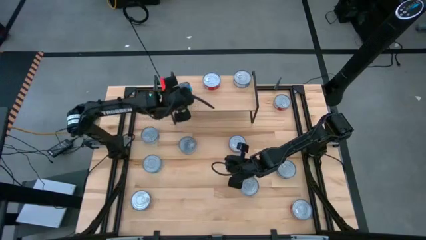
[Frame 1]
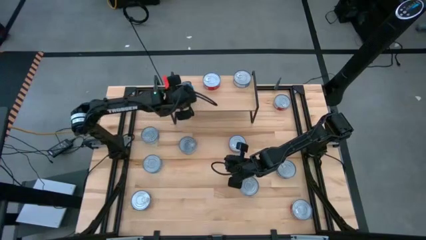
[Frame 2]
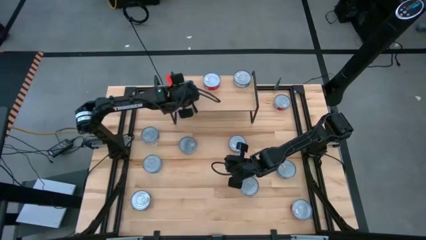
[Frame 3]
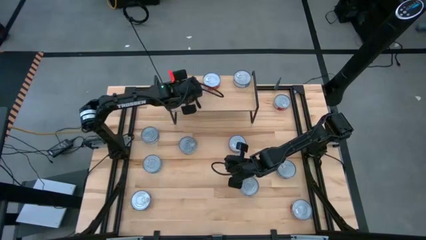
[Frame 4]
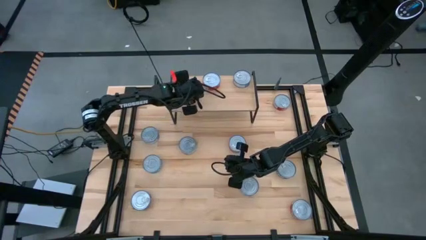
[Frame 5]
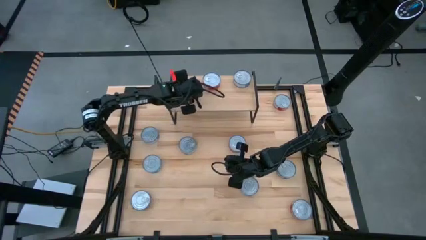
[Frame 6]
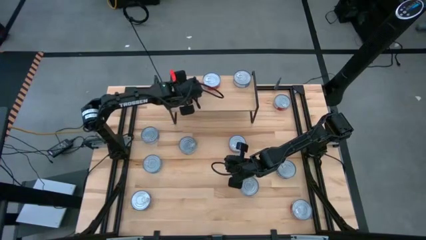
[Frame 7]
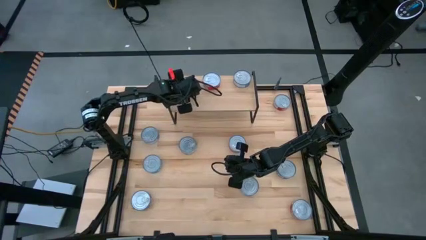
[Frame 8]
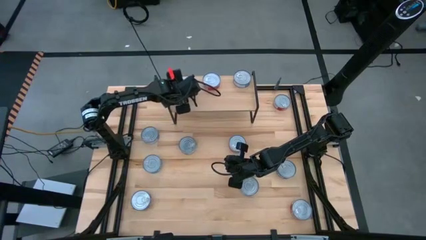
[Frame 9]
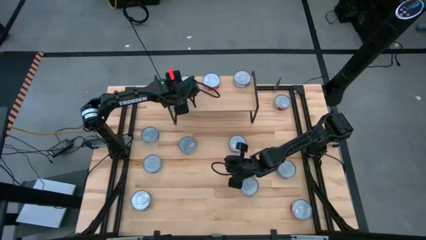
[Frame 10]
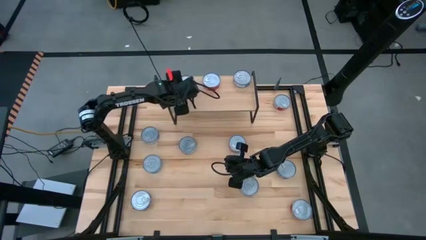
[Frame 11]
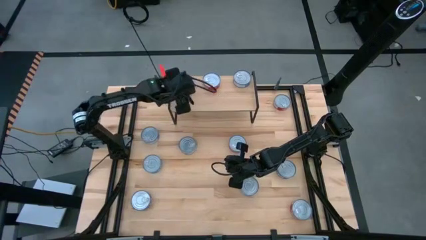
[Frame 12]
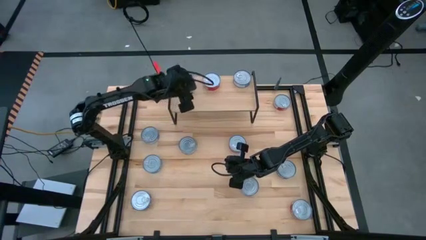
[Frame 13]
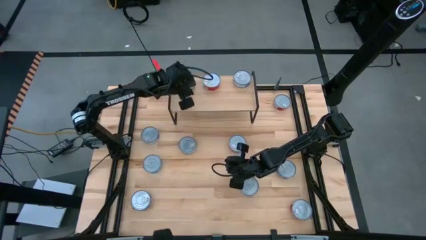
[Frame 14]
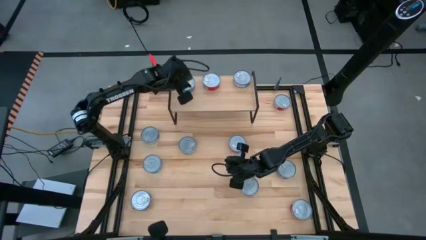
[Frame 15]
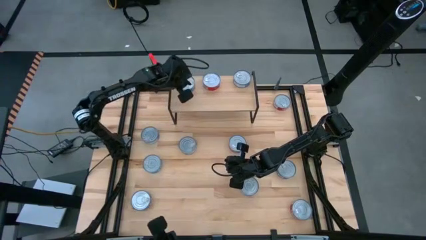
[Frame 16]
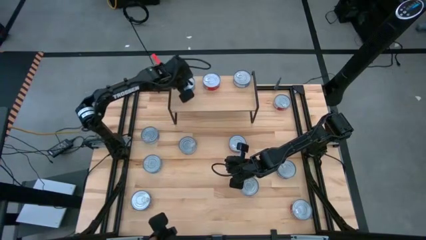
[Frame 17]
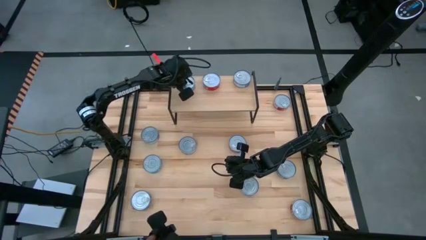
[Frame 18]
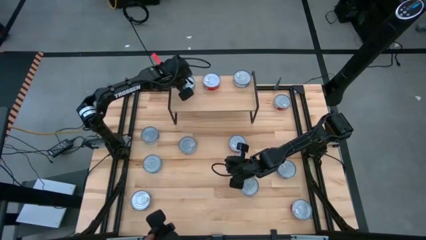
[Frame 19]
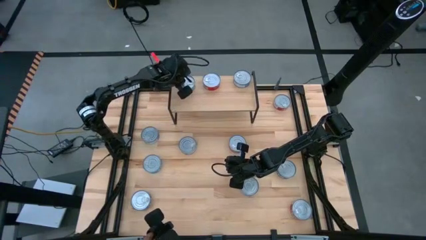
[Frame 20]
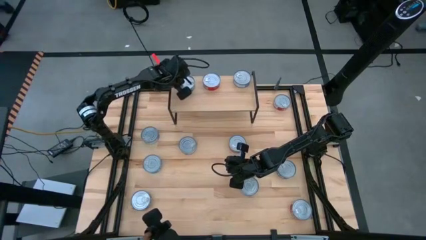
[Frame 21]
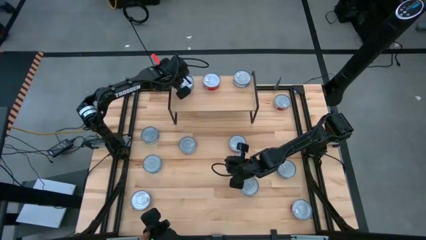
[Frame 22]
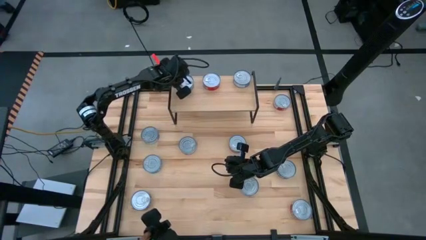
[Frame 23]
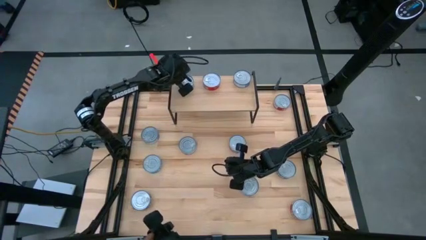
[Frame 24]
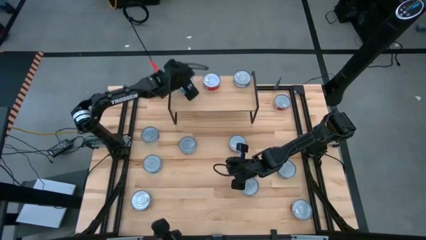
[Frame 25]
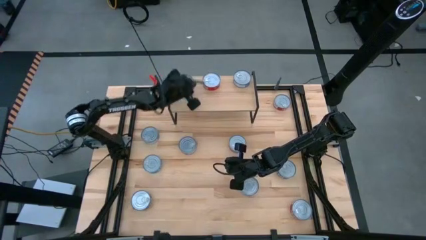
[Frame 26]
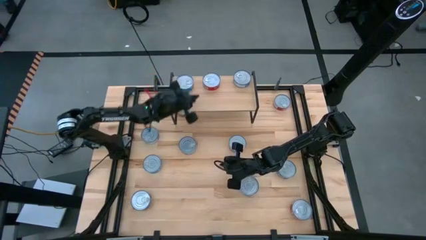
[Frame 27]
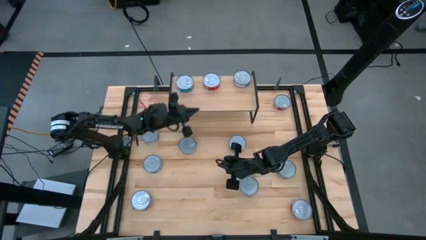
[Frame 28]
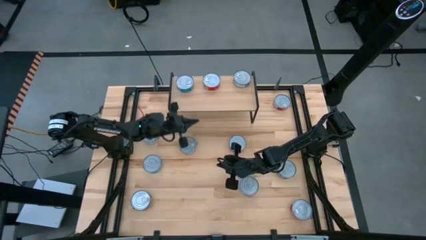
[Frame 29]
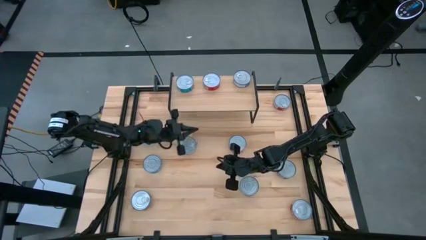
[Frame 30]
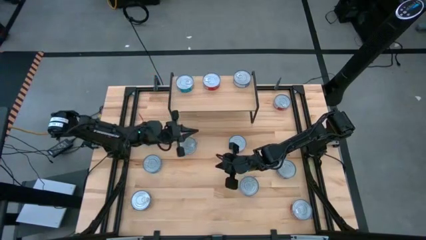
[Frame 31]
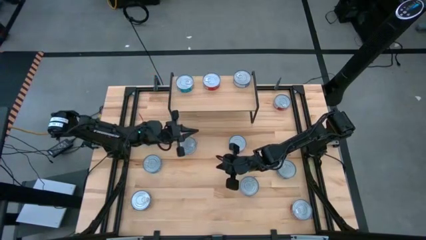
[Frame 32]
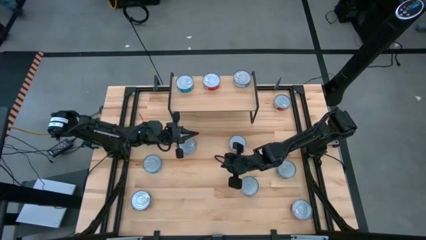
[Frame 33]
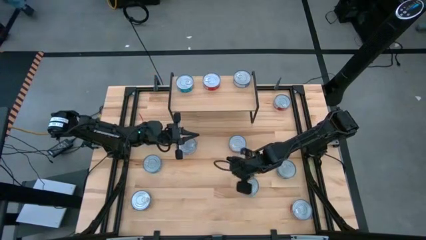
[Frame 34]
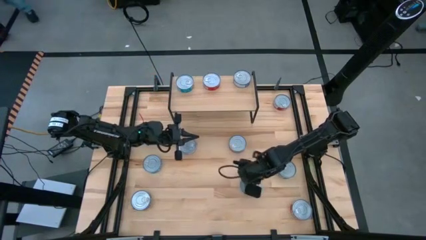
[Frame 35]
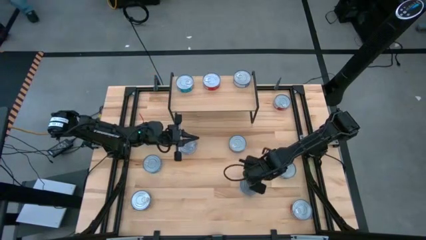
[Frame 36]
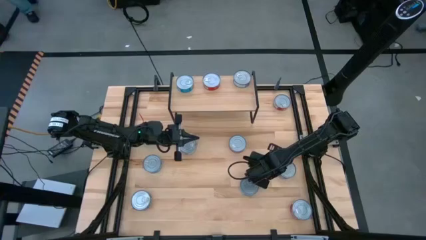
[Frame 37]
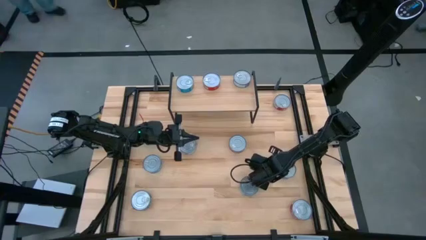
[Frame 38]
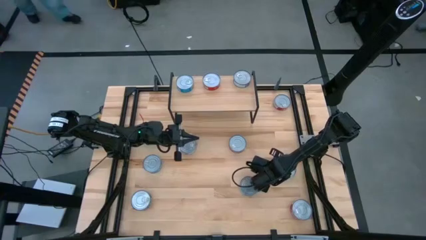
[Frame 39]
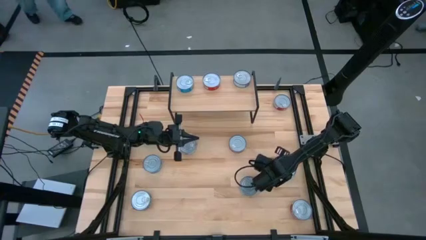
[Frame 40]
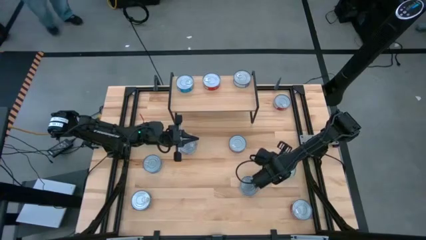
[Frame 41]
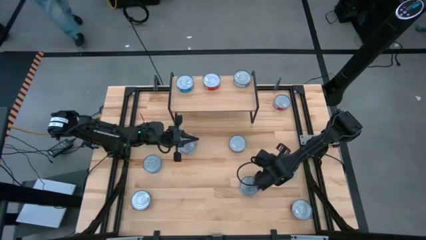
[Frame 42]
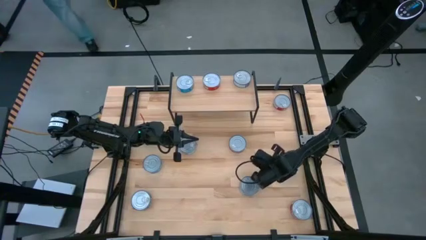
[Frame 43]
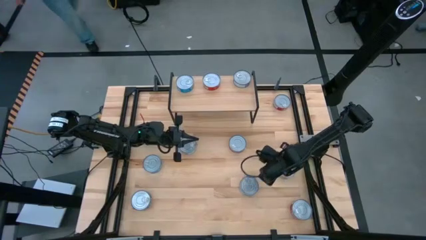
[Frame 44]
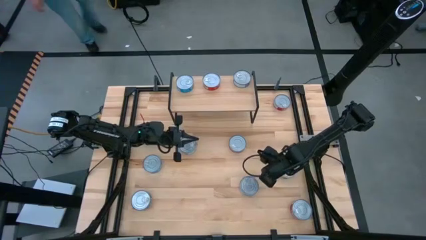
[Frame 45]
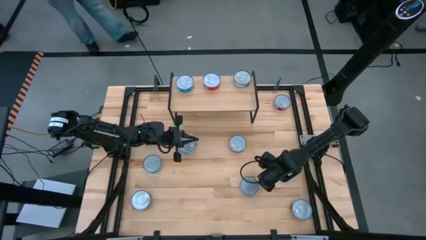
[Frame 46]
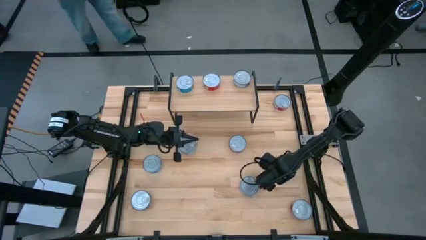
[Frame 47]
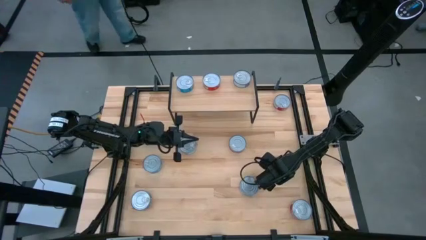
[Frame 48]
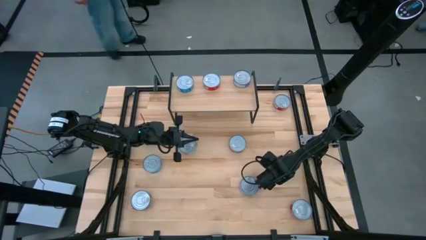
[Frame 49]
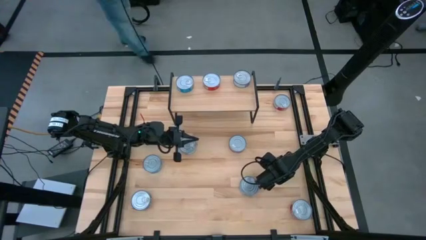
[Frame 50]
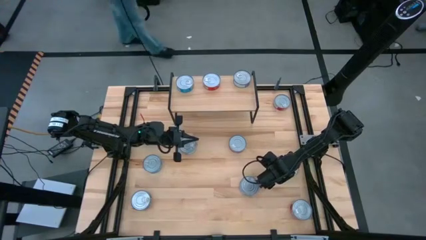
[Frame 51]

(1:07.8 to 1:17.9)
Task: Stack canned seafood by type on shelf
Put the yellow blue tuna can on the shelf

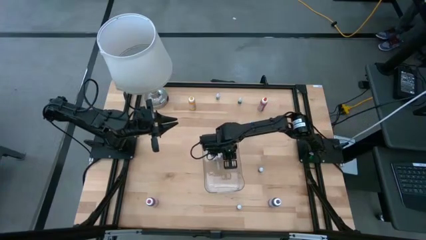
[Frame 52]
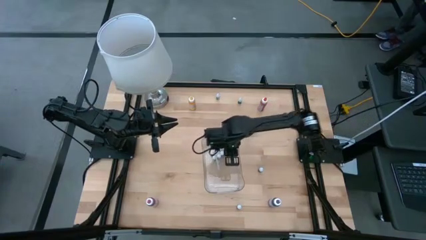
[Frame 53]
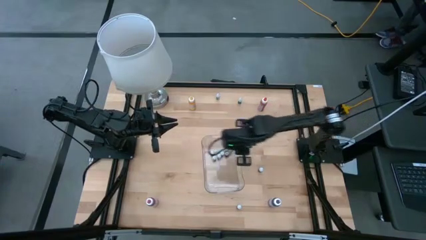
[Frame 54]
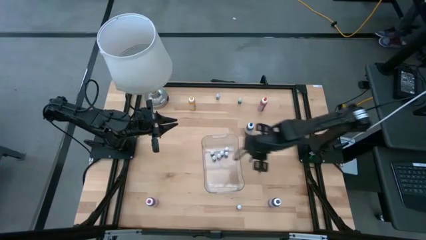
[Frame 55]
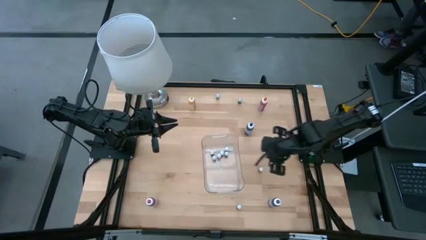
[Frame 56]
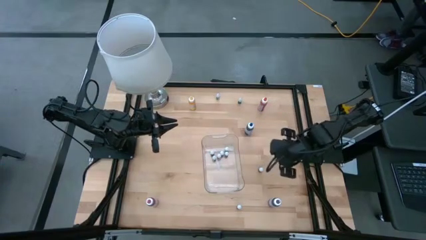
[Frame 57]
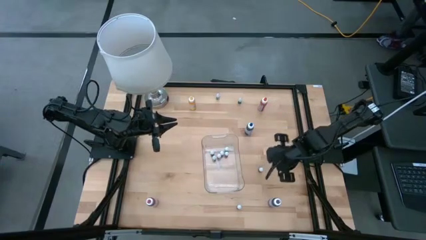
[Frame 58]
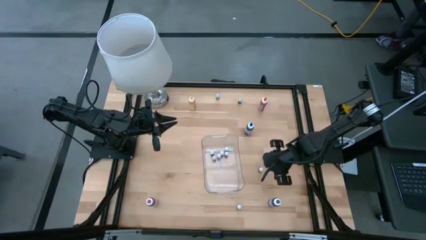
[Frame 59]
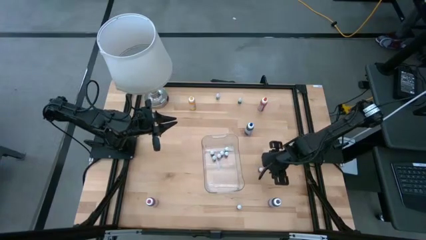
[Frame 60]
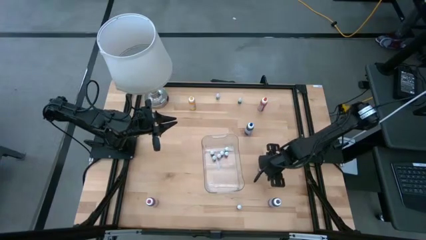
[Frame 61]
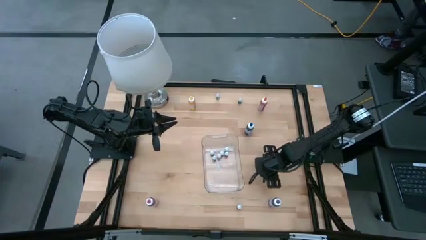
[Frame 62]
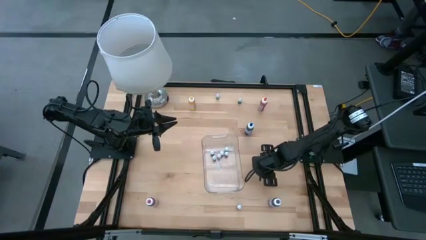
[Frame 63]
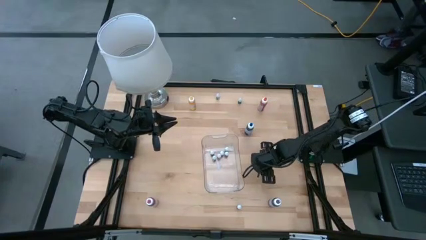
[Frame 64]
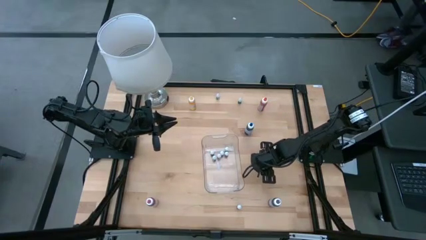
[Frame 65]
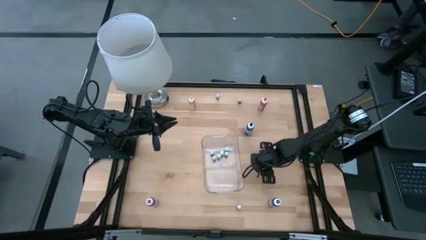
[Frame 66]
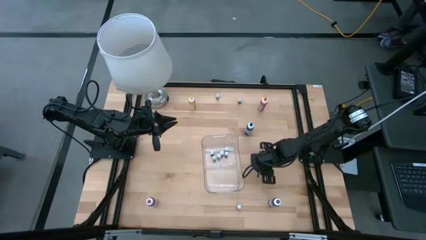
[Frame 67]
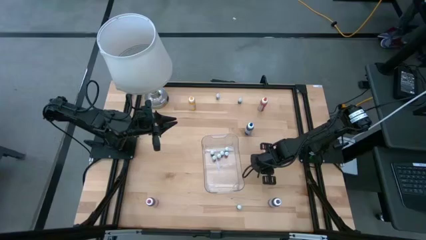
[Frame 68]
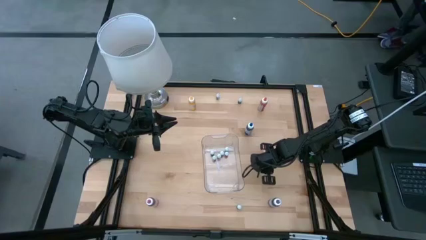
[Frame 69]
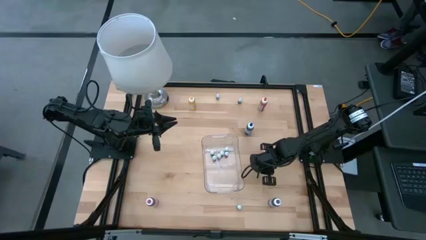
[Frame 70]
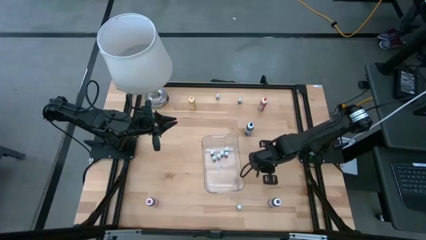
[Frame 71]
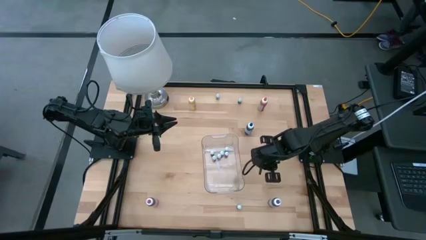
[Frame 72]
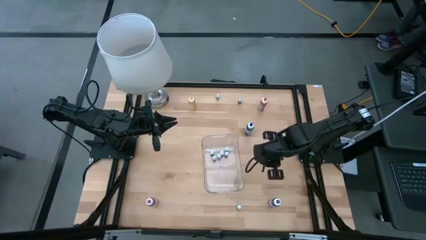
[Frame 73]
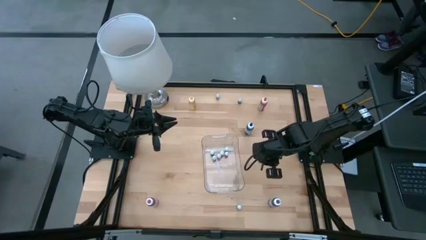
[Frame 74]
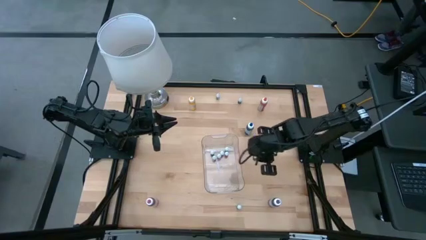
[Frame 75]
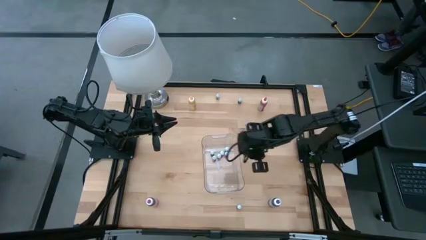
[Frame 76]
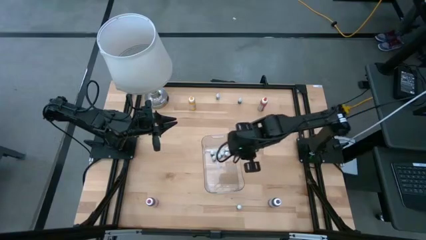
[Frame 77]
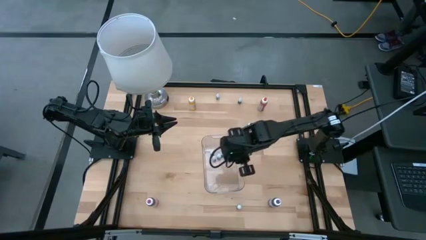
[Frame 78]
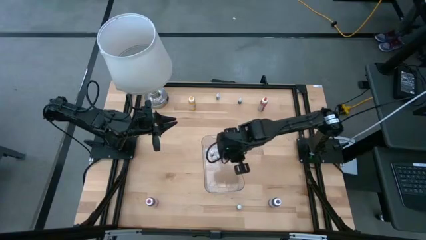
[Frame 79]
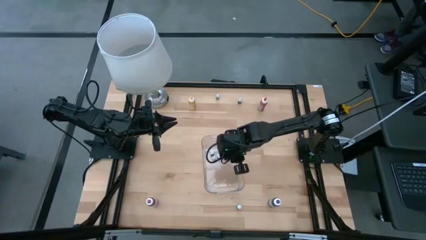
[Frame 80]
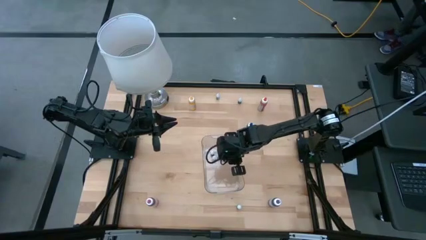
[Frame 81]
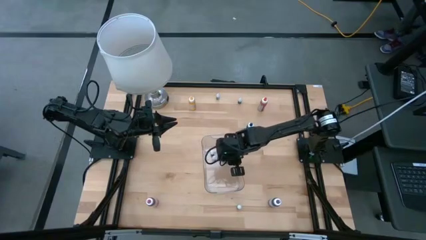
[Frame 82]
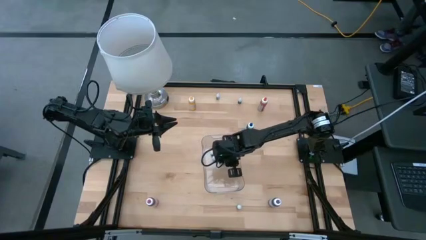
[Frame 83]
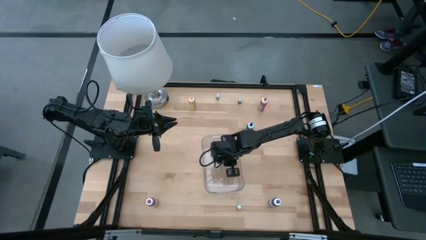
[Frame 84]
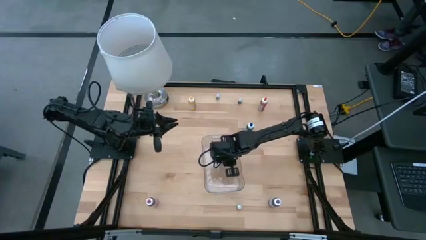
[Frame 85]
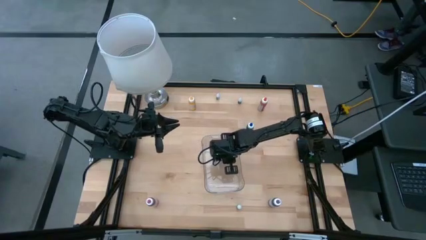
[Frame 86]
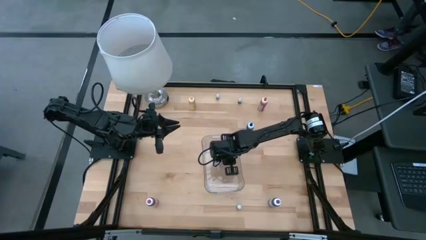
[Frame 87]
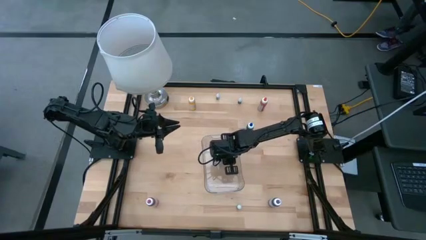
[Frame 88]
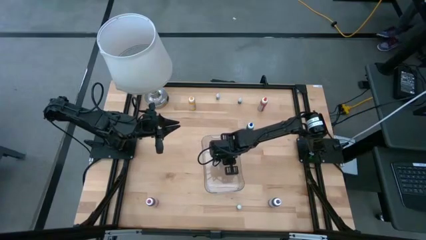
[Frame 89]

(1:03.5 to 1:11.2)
Task: Pick & Place food coloring
Put the small purple food coloring bottle into the transparent container
